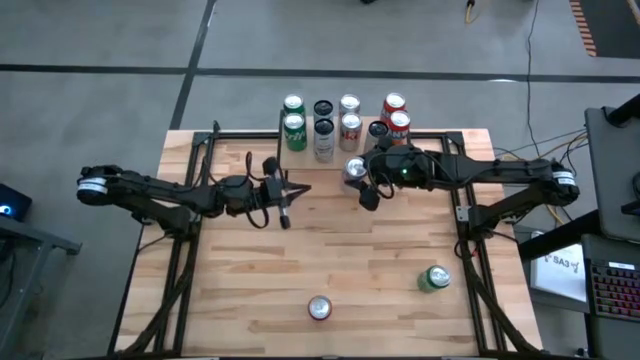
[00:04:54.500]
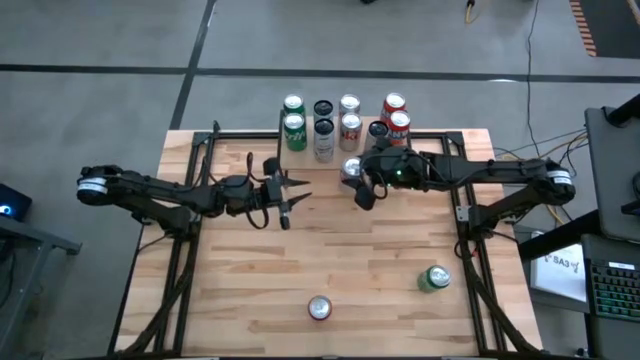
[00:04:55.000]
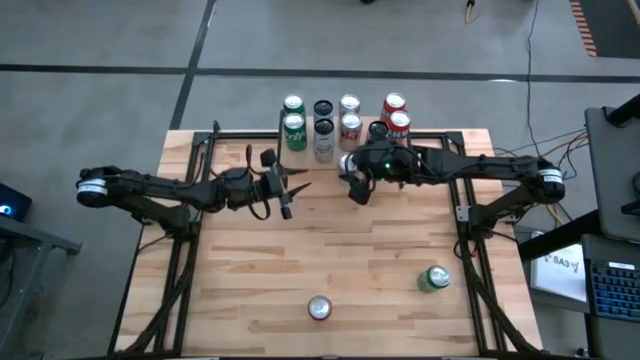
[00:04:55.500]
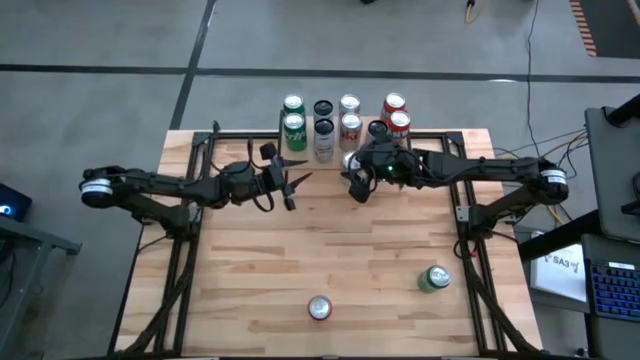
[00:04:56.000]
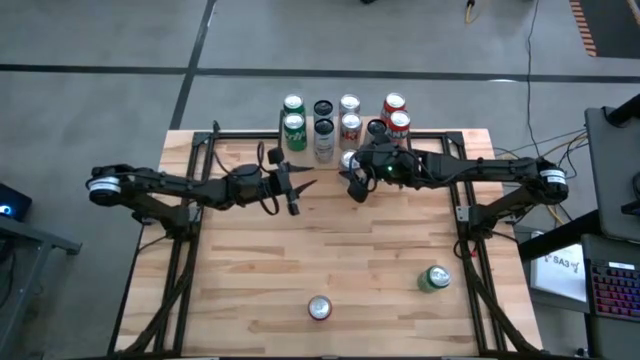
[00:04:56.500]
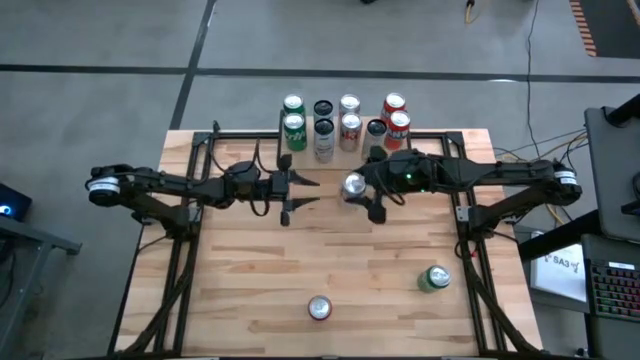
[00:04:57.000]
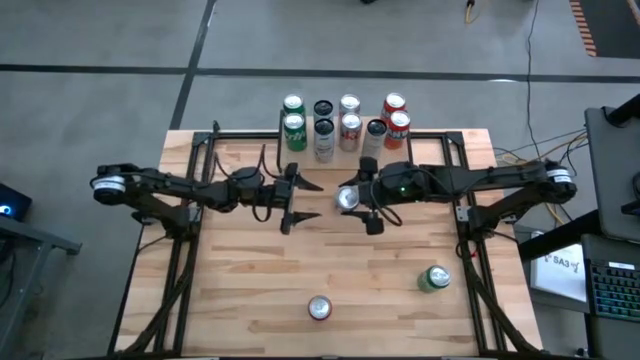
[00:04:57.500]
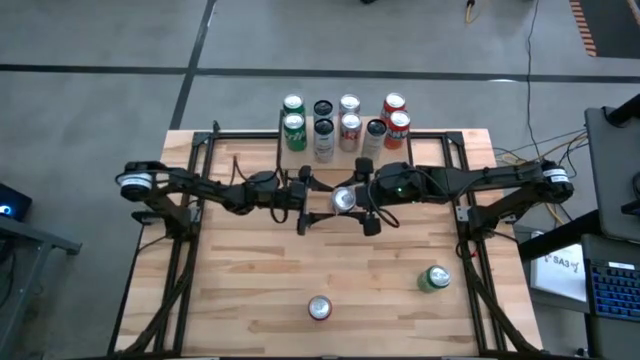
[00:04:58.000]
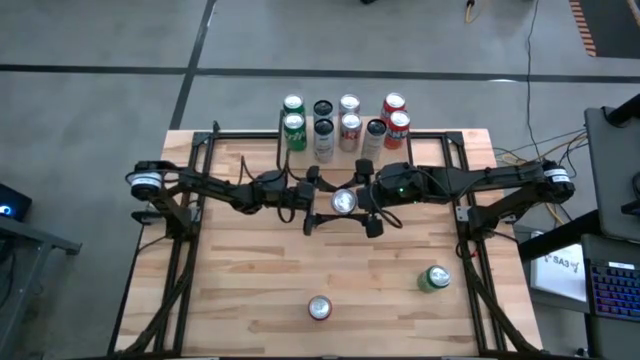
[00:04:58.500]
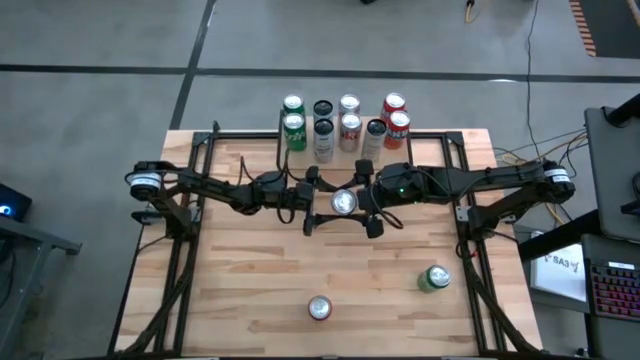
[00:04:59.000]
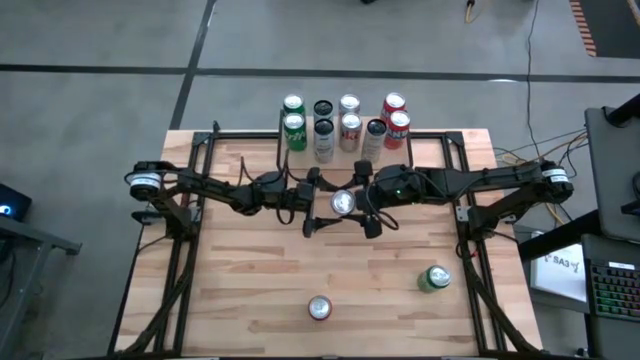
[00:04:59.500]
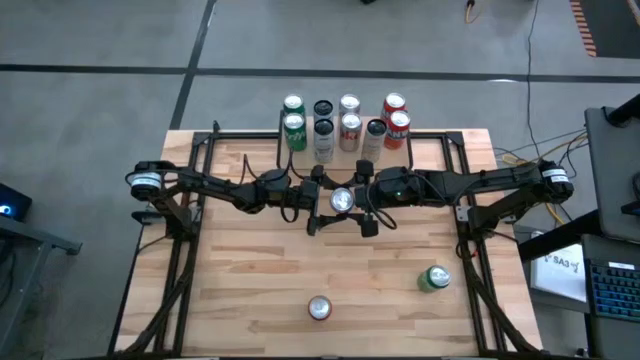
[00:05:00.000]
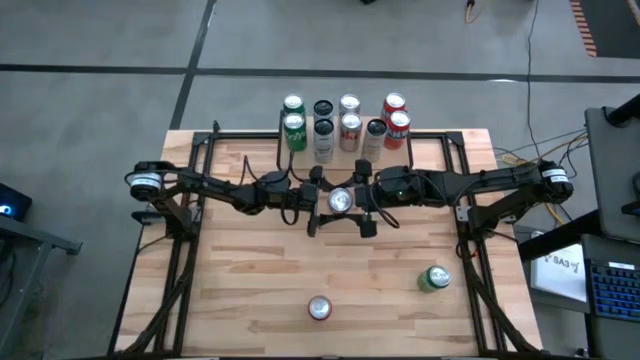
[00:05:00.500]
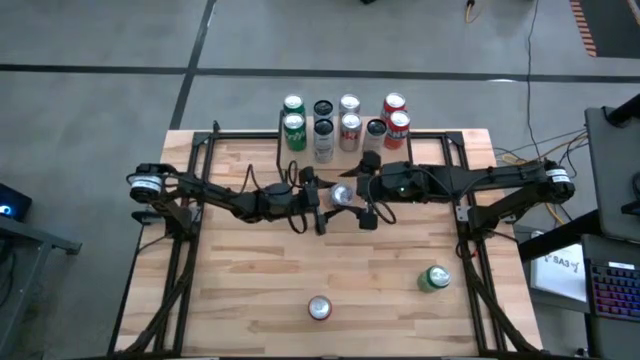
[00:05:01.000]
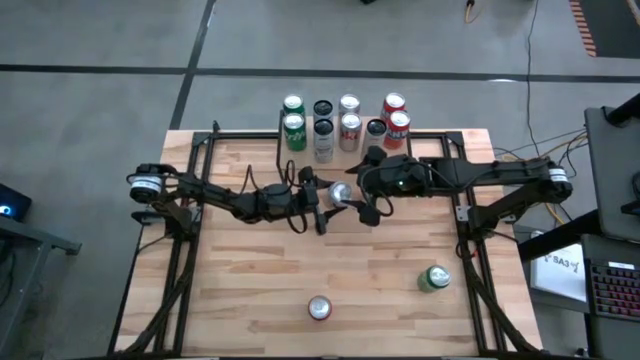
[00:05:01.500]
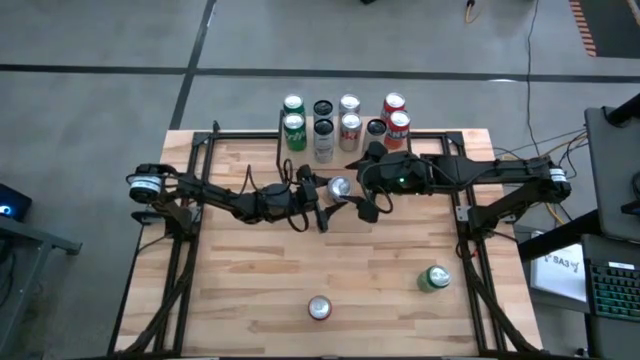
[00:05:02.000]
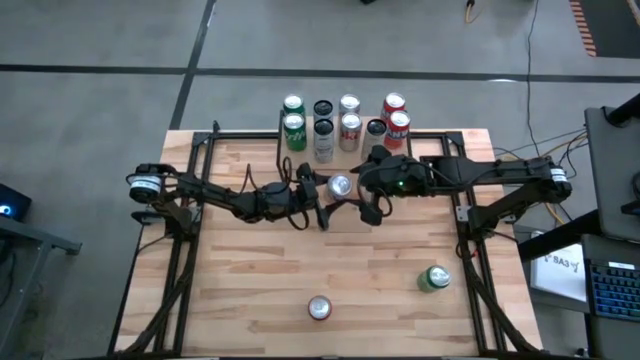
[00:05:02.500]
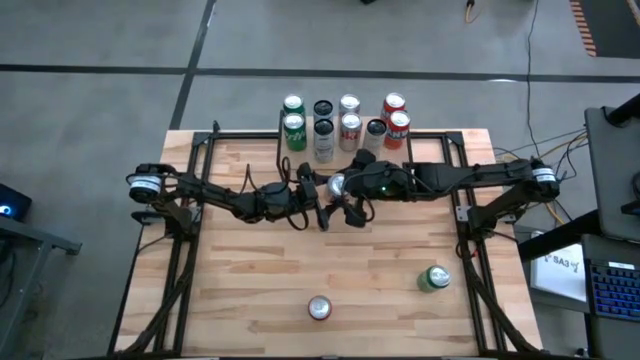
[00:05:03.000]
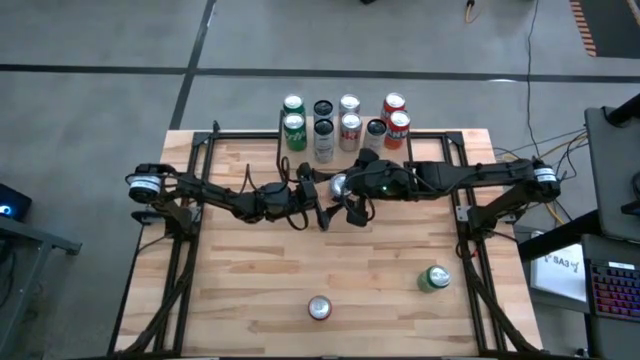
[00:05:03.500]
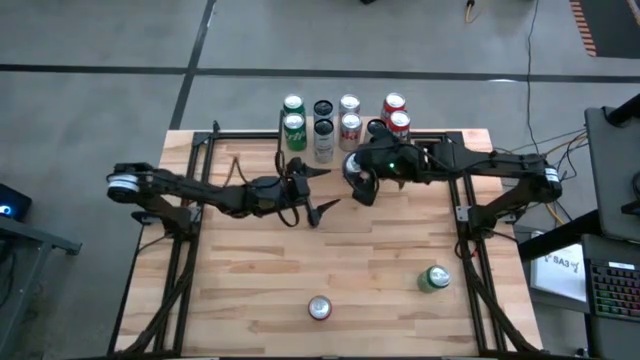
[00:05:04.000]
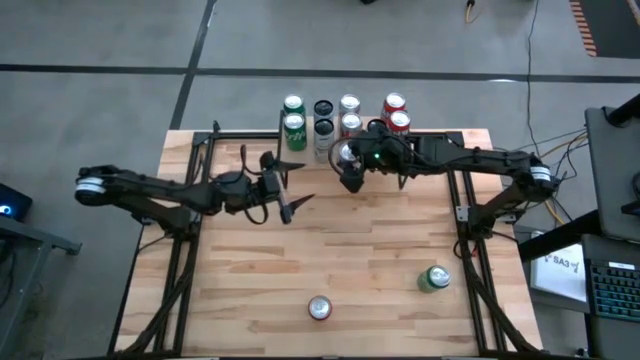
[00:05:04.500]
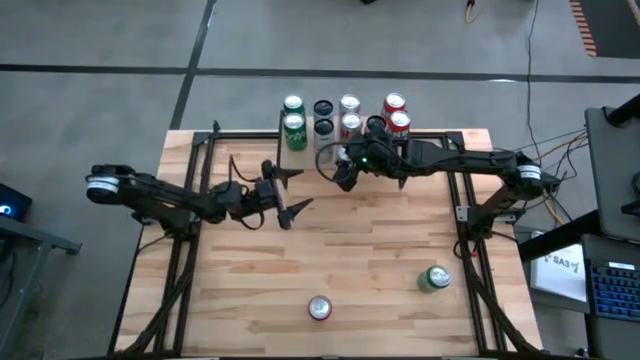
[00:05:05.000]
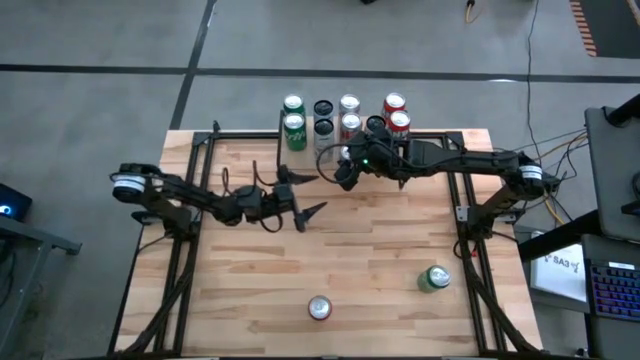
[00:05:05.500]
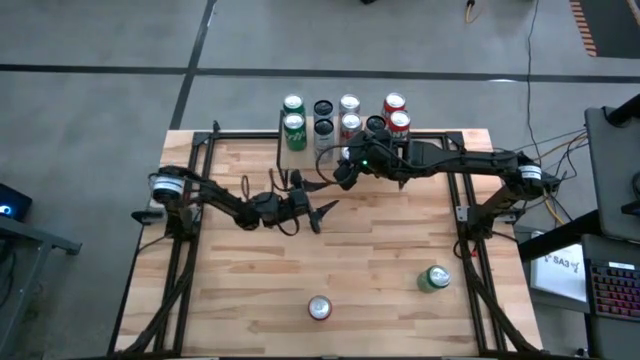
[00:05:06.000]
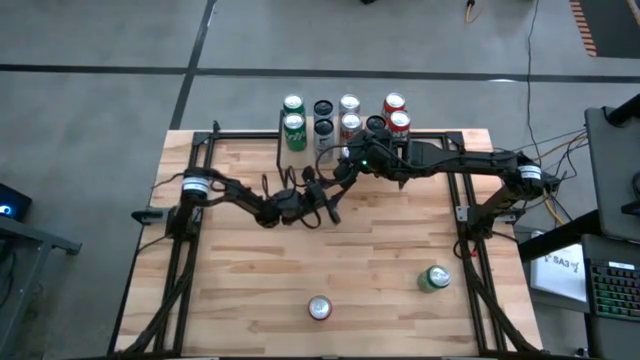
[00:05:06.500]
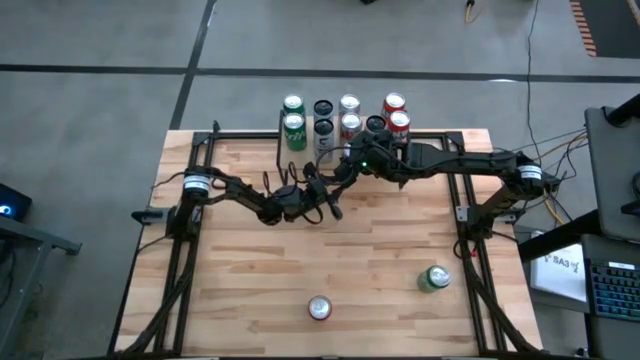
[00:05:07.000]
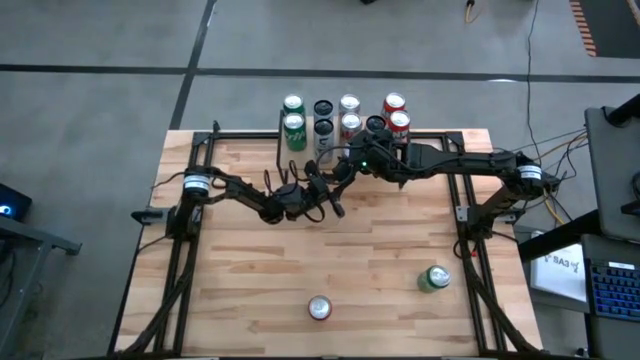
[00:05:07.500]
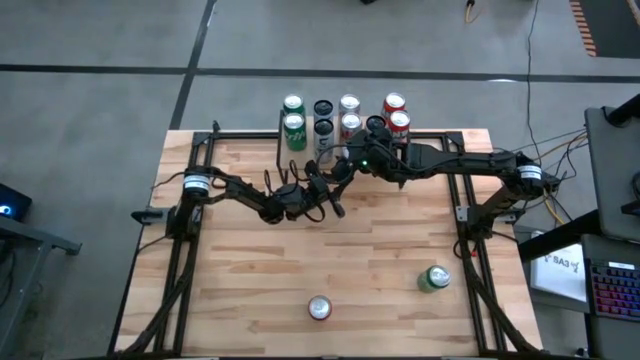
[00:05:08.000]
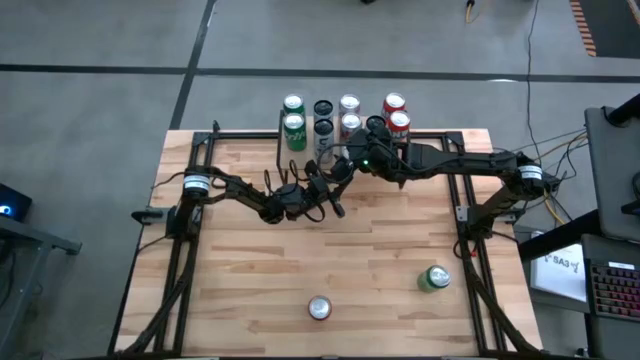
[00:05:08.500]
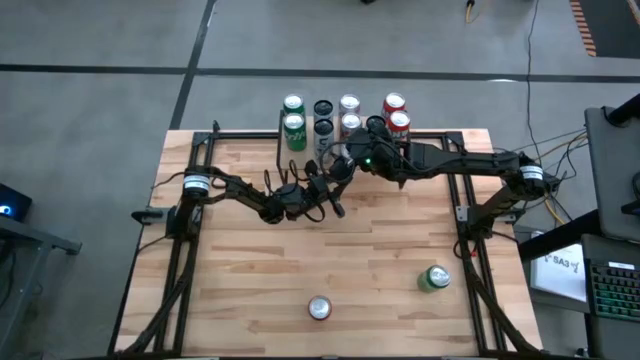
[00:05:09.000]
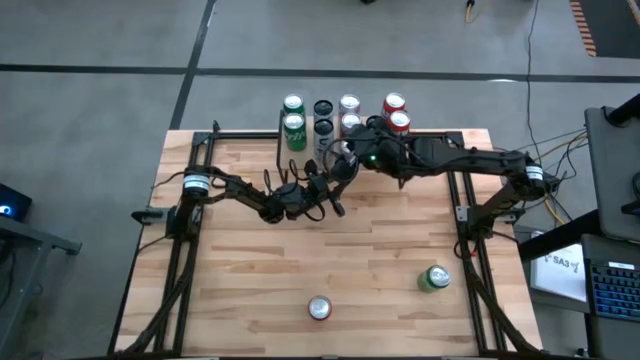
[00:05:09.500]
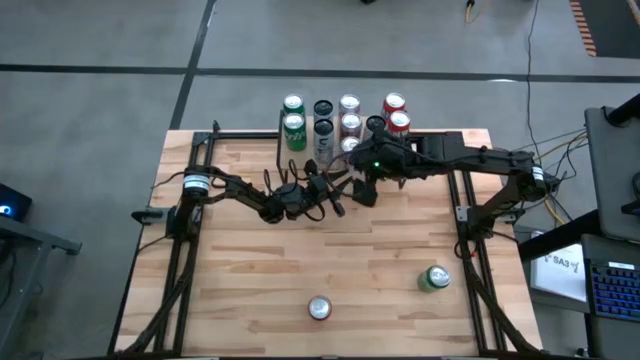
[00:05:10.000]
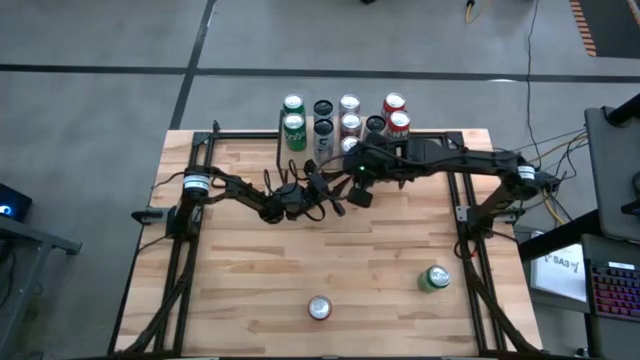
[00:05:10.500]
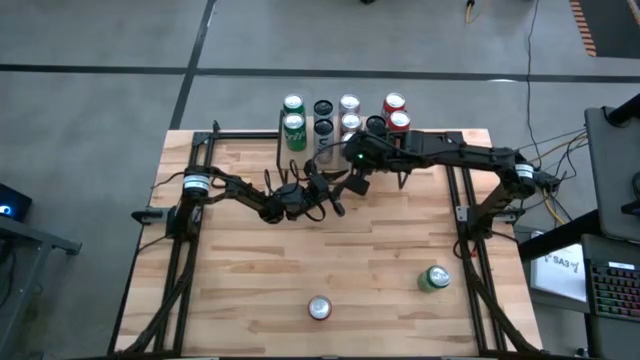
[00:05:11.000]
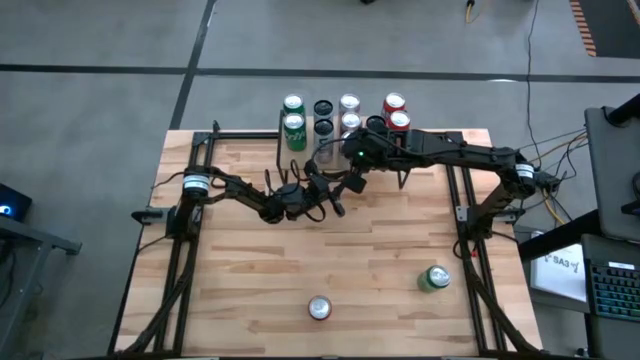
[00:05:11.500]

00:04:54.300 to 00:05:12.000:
Task: Place canned beverage on shelf
Put the white red soda can on the shelf aligned with the other white red soda cans
